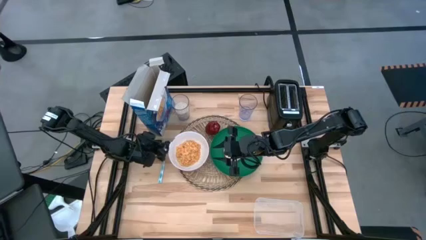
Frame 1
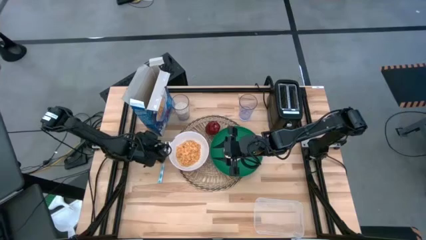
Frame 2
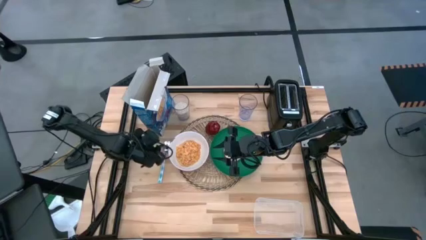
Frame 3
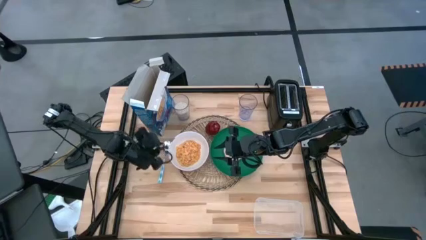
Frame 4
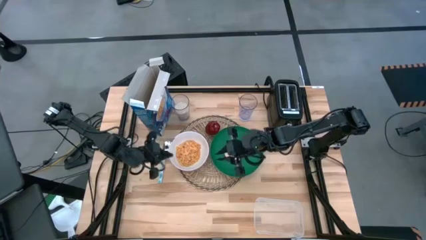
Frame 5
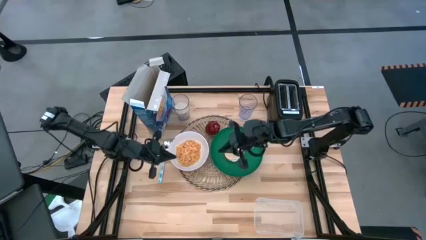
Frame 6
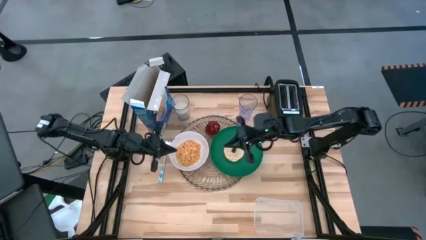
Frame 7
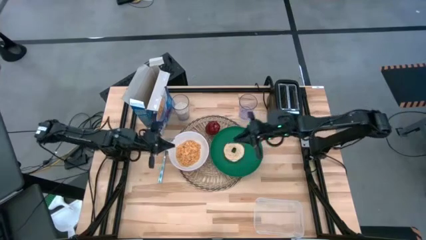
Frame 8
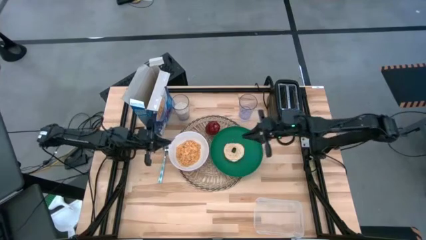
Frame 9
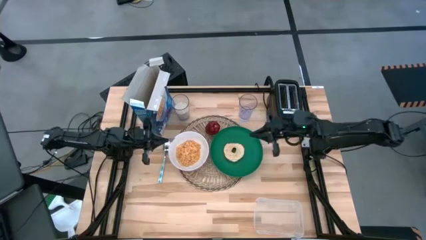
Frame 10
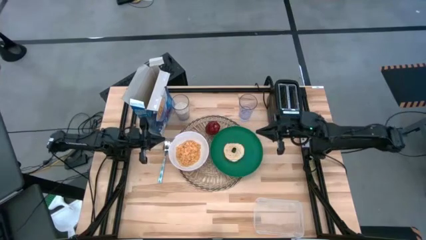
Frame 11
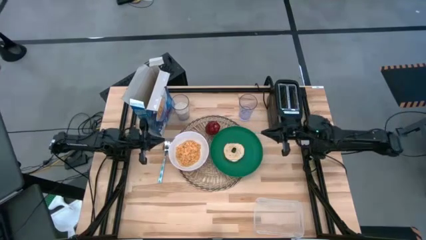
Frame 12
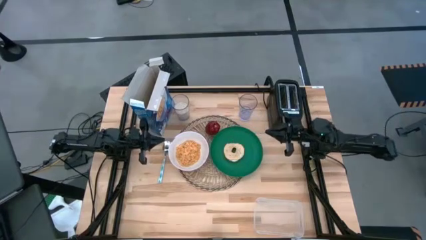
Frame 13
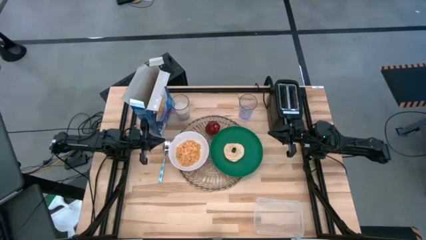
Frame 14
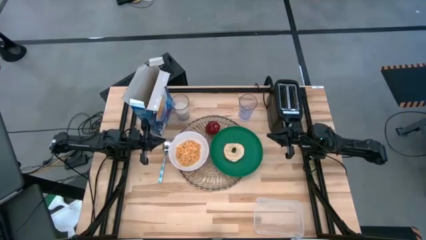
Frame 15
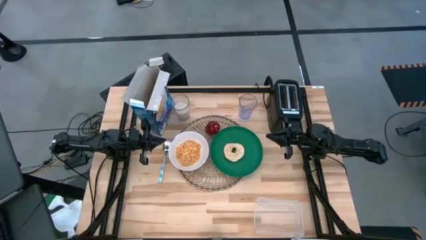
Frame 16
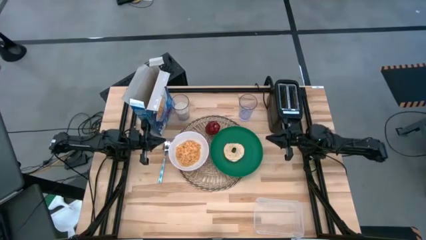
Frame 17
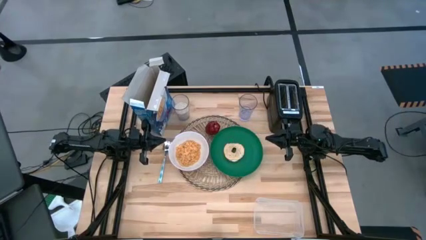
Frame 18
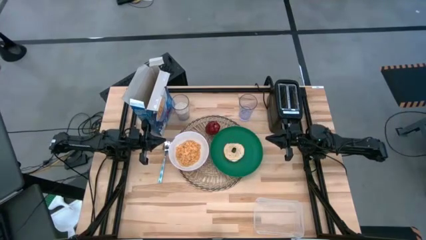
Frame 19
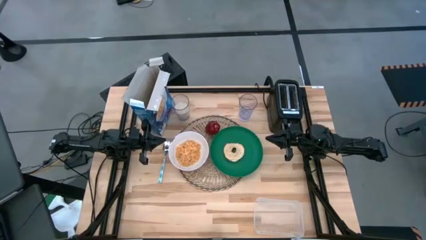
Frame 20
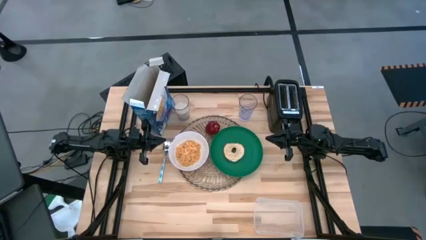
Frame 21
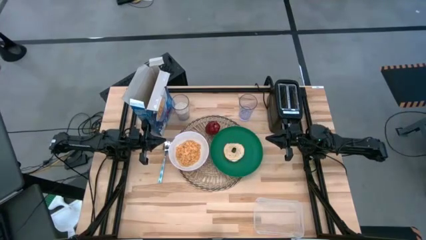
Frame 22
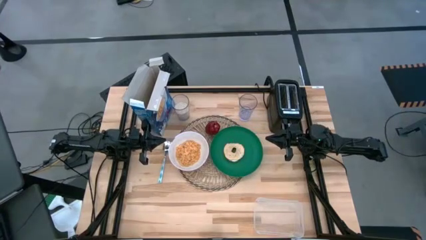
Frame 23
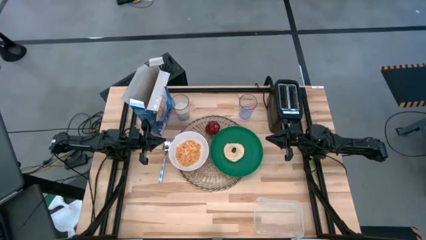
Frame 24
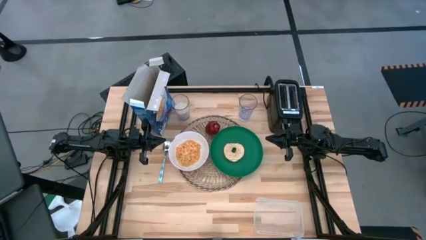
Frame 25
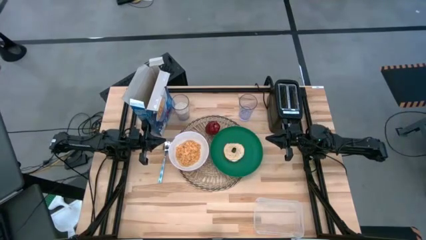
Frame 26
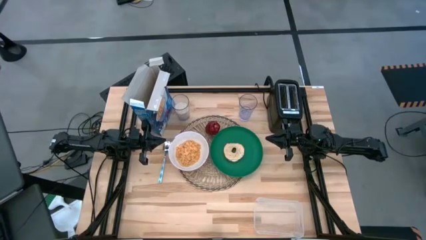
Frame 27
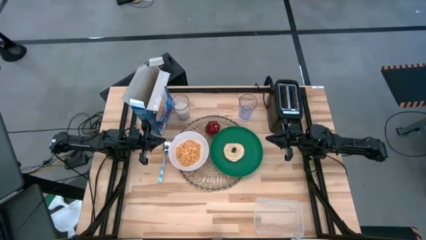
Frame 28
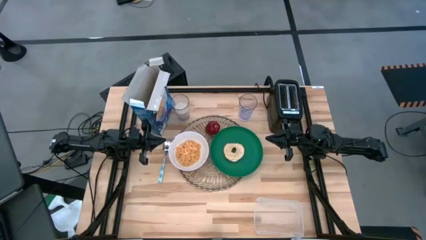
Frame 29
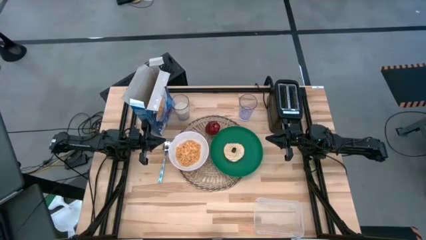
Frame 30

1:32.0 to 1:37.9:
Task: Arrange a breakfast setting
Return to Home Position

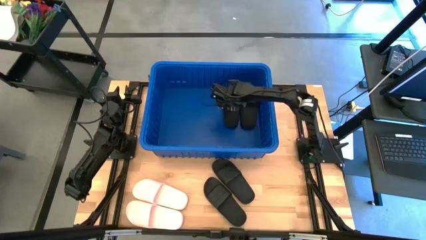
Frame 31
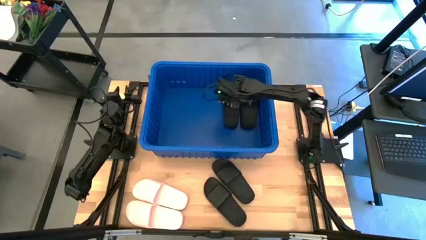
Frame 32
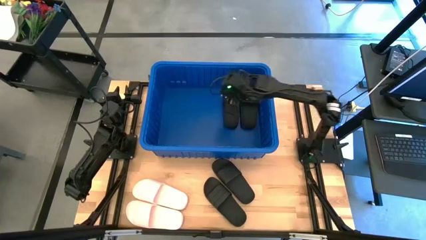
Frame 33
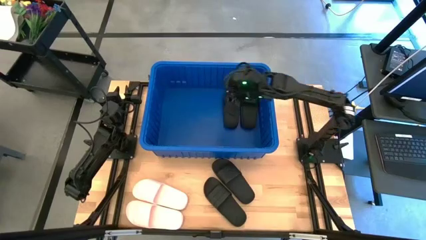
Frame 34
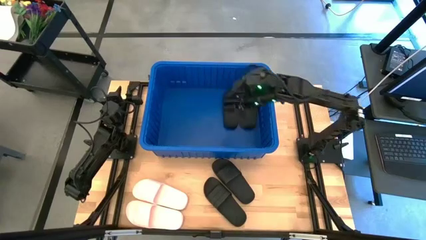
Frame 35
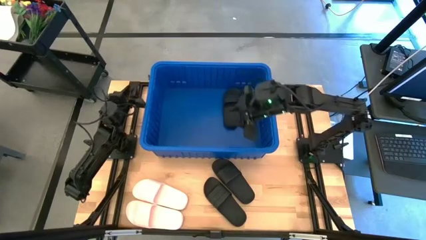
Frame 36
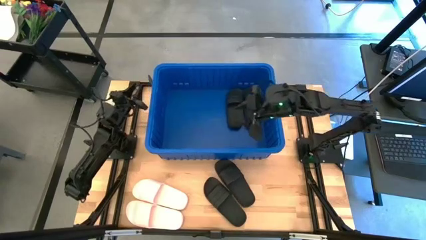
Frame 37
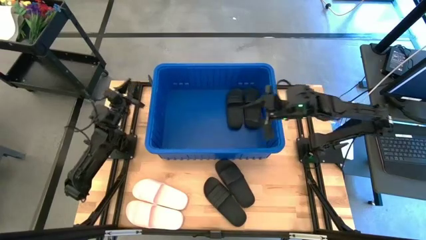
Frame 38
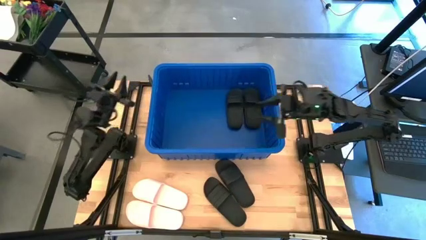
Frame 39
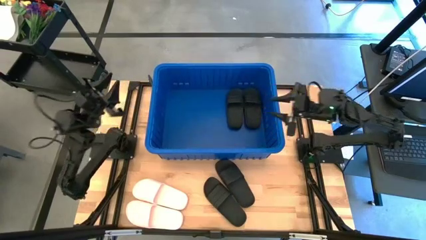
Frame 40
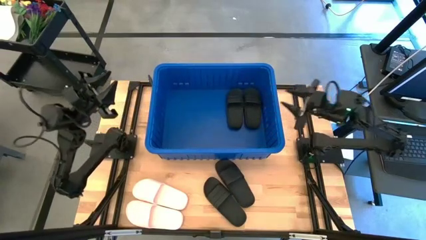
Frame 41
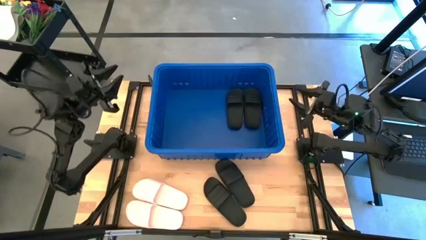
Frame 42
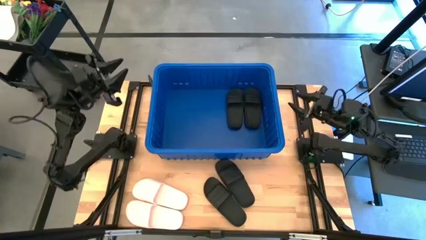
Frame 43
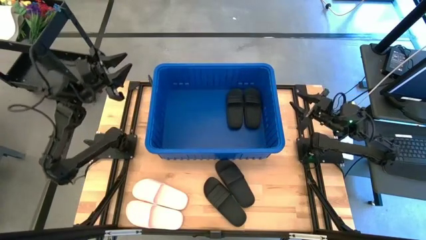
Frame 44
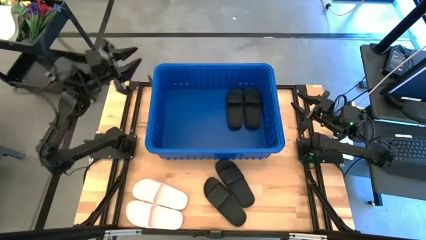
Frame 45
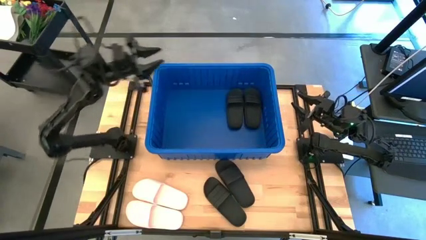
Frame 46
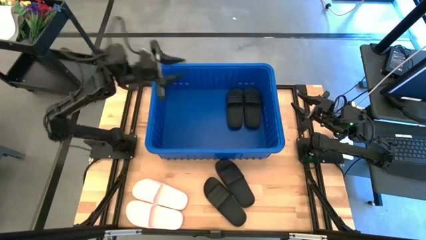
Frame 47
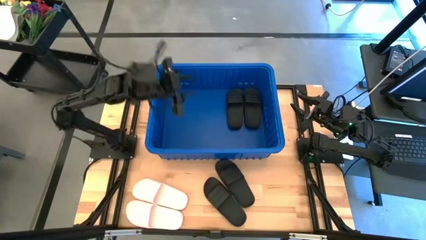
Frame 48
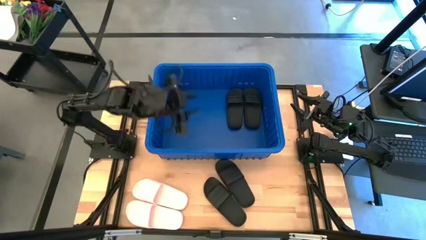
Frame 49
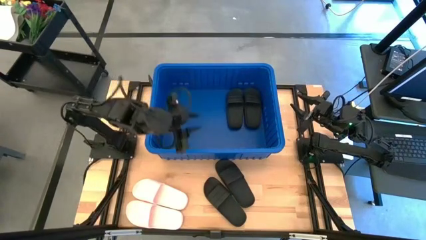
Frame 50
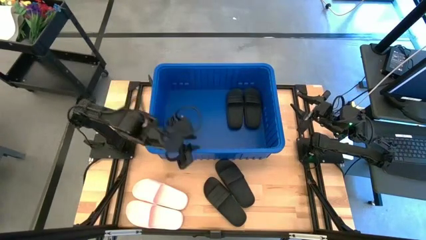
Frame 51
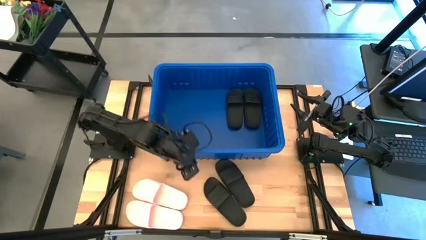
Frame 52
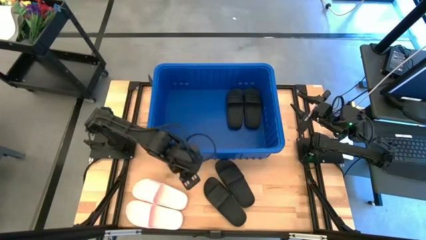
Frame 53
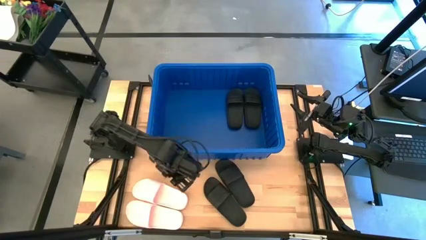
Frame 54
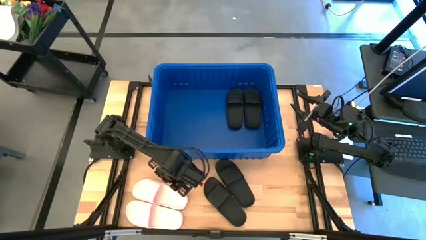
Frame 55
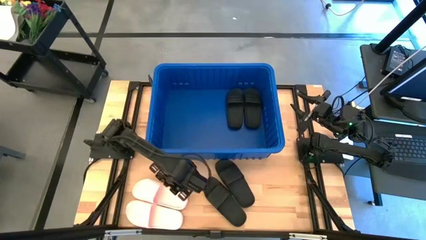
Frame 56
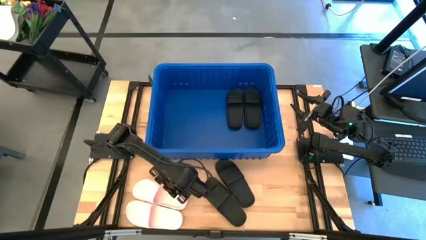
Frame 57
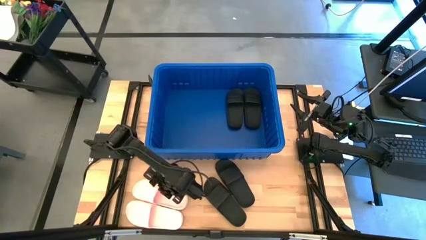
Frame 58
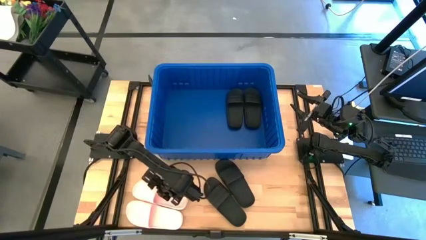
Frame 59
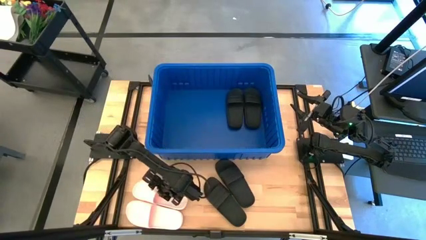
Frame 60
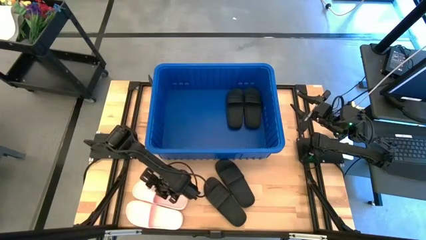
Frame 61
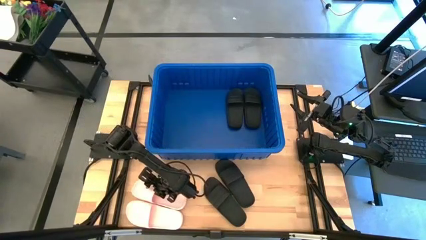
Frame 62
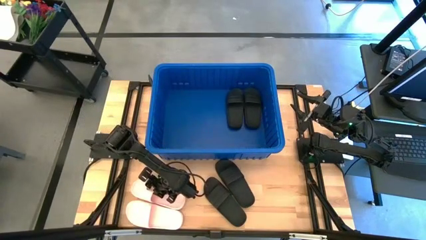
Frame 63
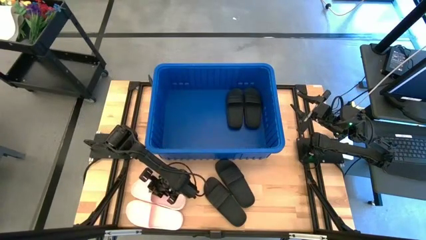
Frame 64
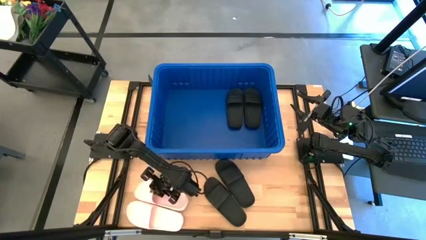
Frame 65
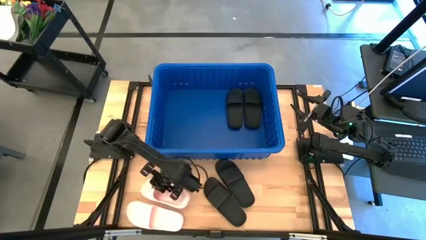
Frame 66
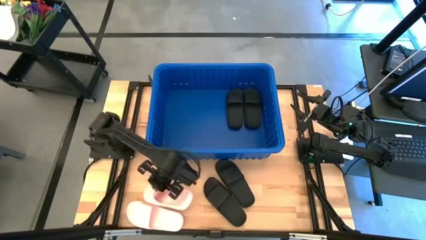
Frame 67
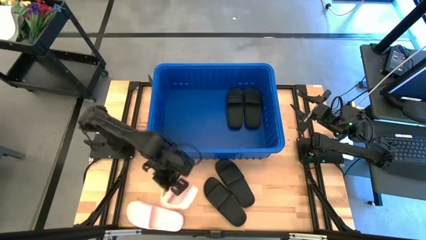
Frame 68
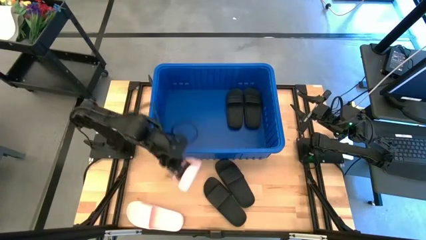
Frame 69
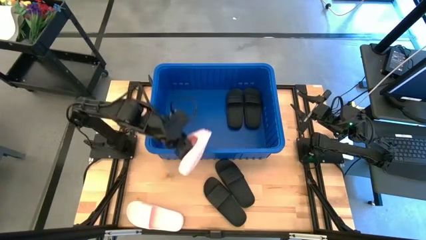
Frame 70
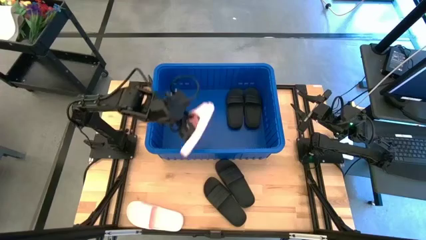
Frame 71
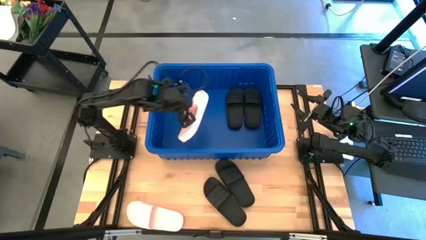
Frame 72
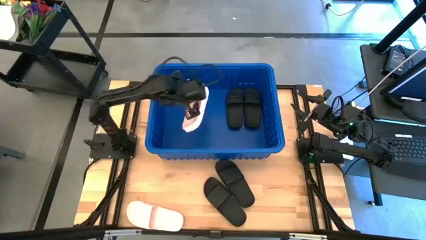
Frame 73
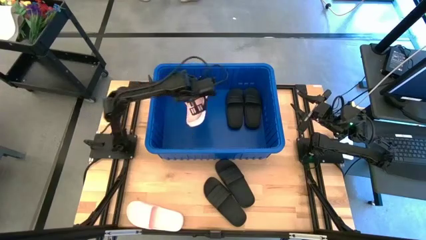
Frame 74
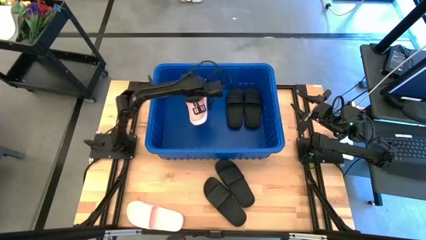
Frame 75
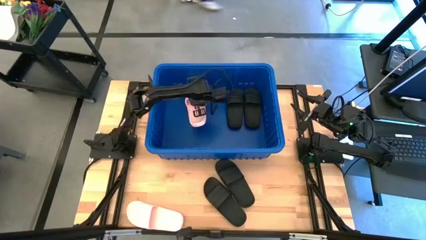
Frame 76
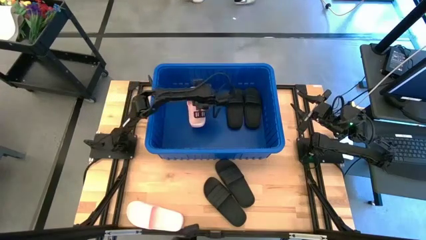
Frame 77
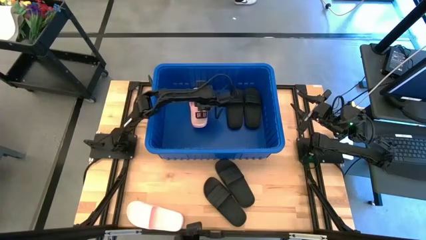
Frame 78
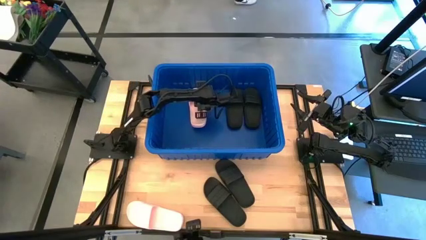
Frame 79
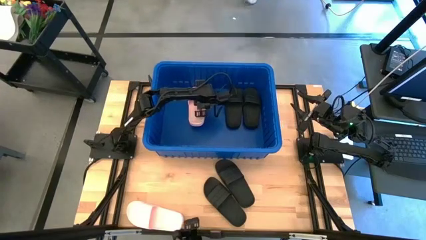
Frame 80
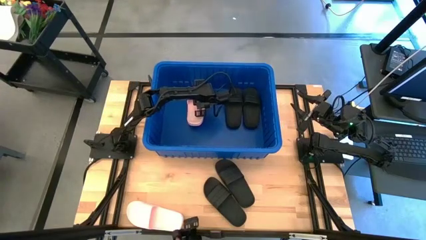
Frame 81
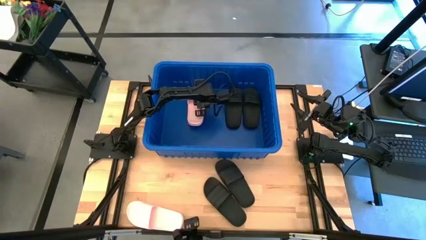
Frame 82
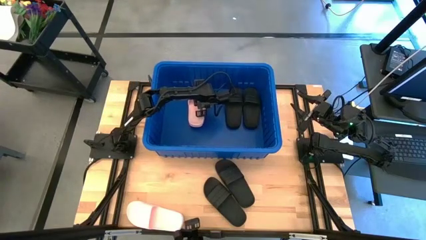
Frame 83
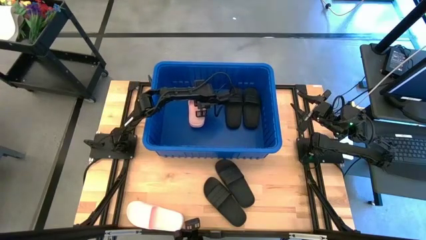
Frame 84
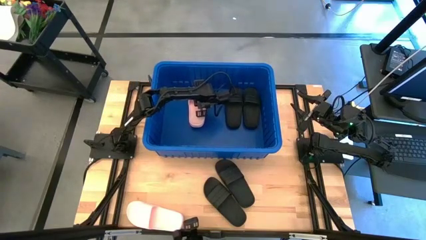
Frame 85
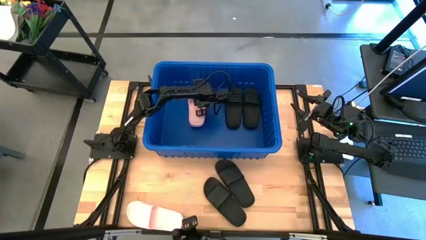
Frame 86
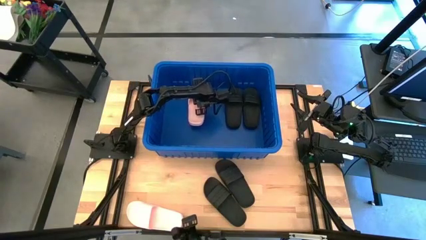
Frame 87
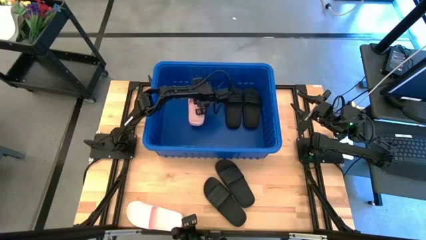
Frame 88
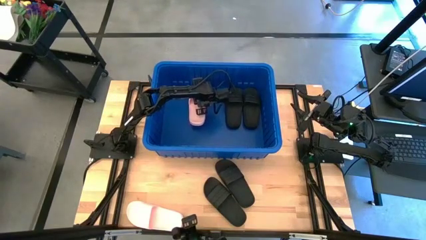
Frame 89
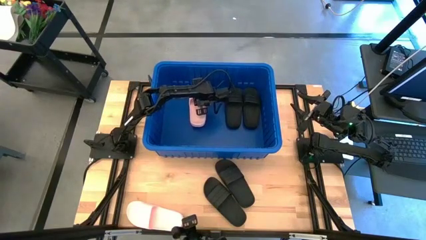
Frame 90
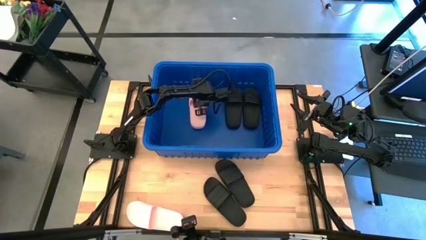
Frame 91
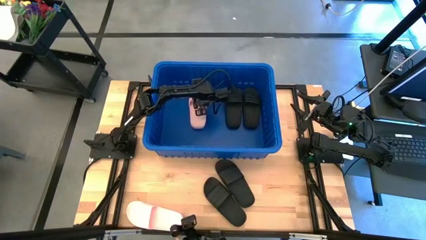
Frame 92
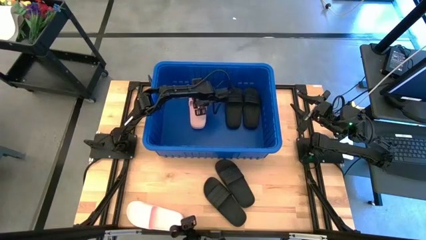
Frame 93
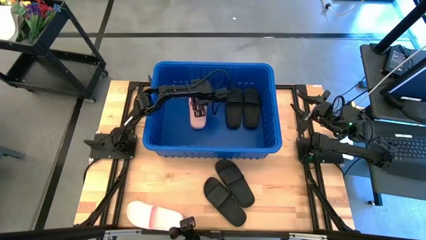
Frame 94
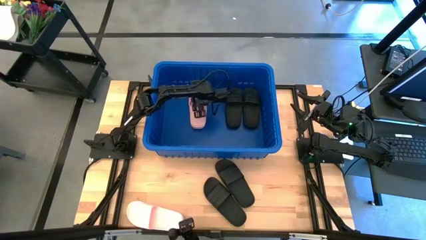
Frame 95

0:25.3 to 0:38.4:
Task: Pick and place slides into bin
Put the right pink slide into the blue container
